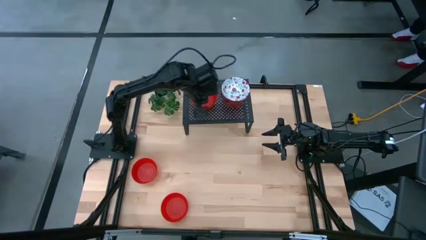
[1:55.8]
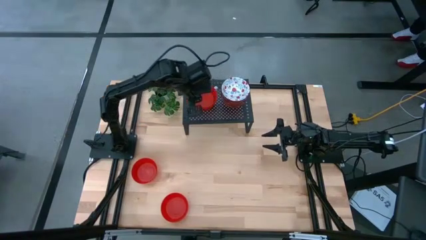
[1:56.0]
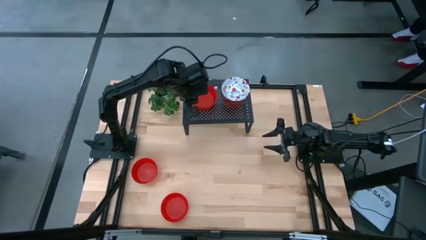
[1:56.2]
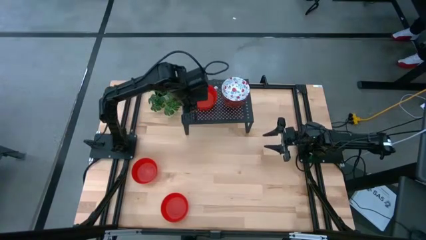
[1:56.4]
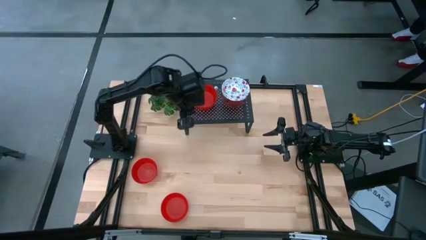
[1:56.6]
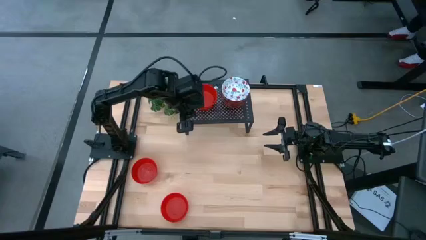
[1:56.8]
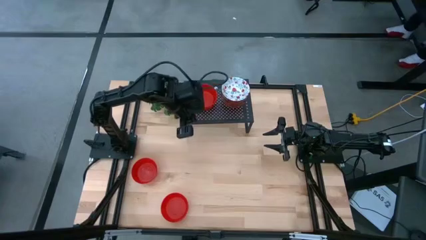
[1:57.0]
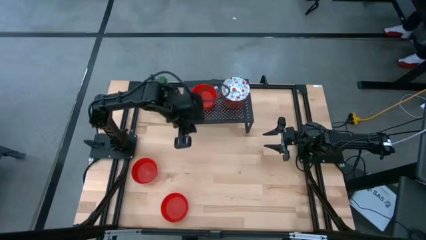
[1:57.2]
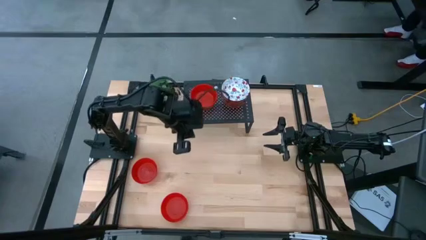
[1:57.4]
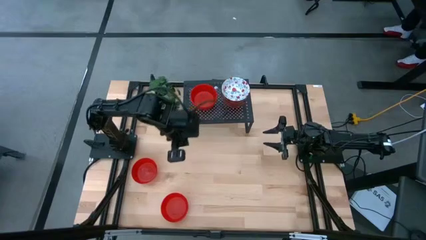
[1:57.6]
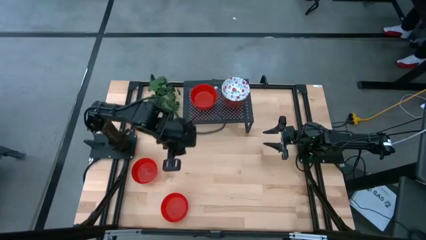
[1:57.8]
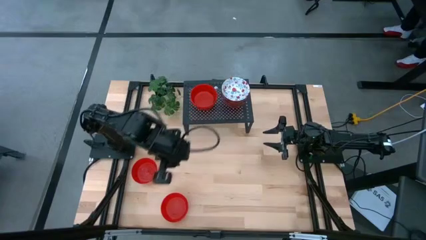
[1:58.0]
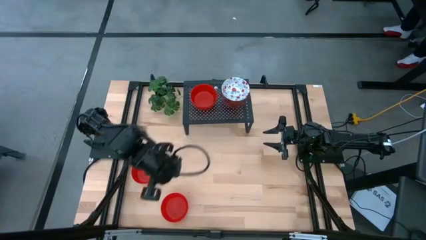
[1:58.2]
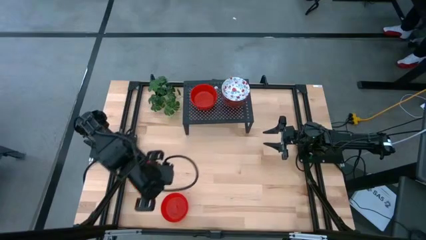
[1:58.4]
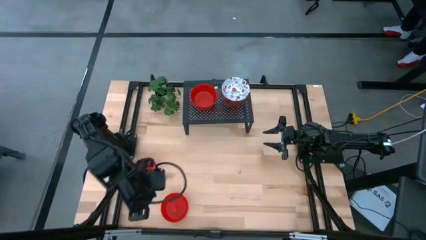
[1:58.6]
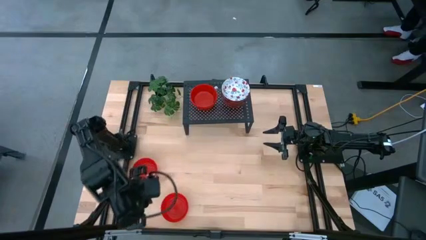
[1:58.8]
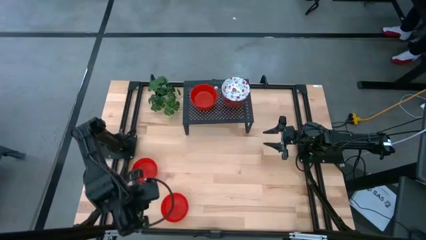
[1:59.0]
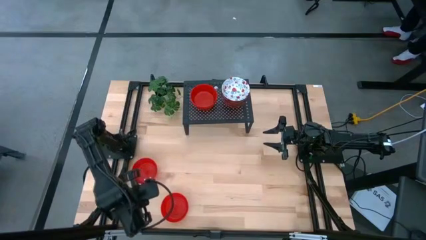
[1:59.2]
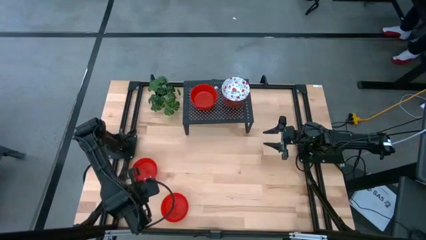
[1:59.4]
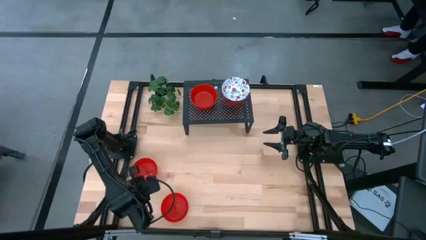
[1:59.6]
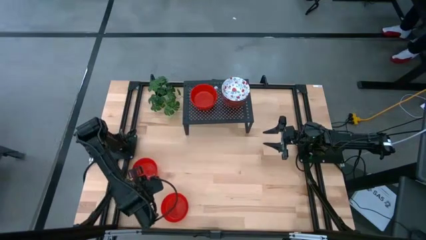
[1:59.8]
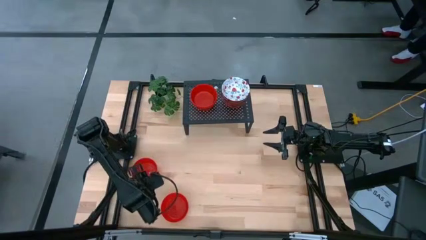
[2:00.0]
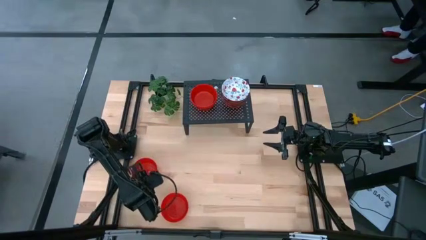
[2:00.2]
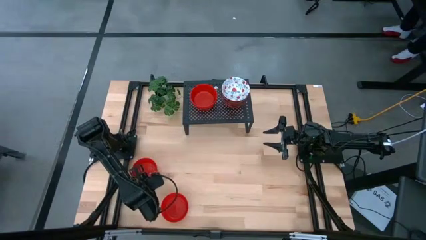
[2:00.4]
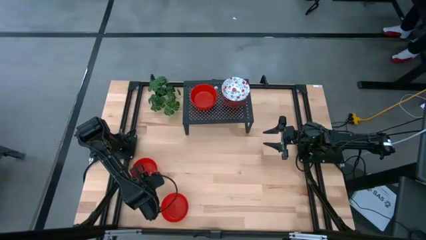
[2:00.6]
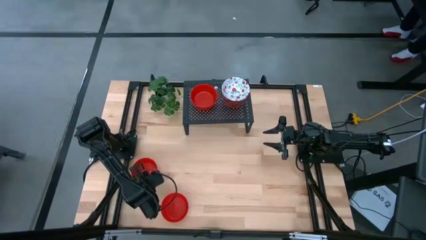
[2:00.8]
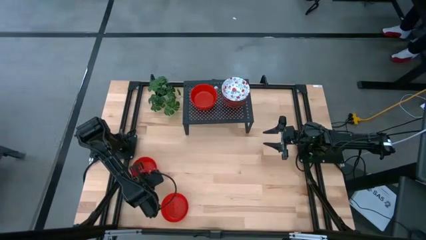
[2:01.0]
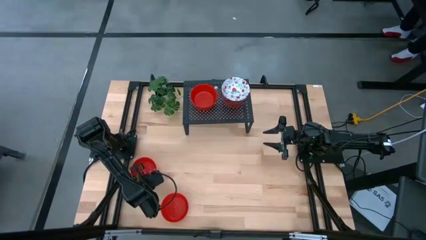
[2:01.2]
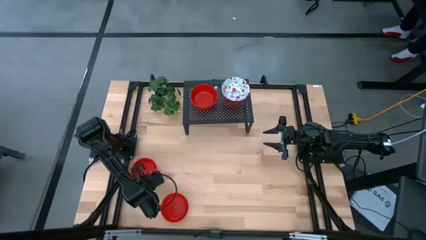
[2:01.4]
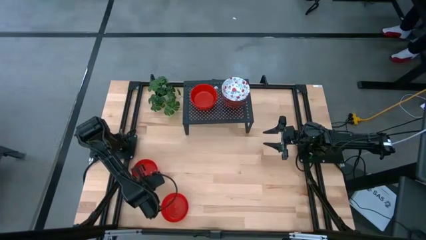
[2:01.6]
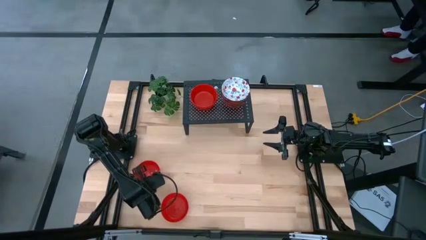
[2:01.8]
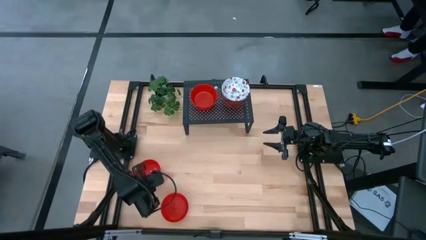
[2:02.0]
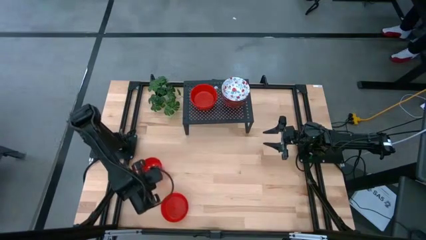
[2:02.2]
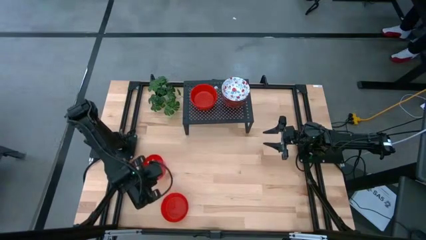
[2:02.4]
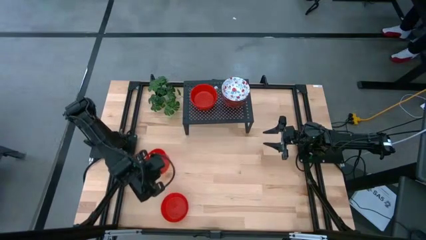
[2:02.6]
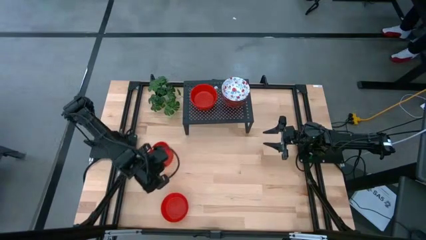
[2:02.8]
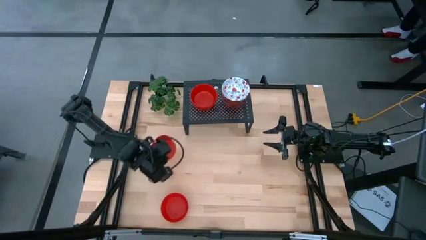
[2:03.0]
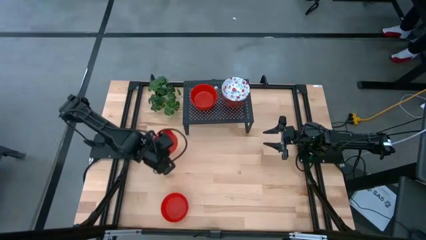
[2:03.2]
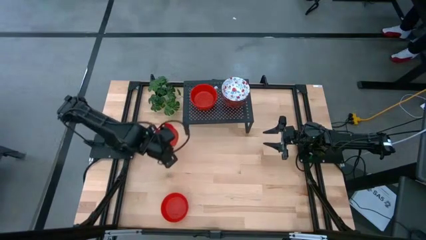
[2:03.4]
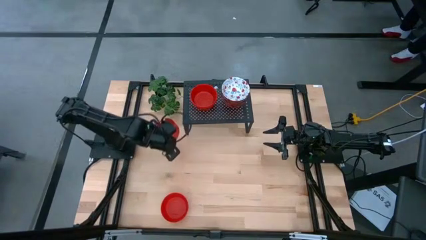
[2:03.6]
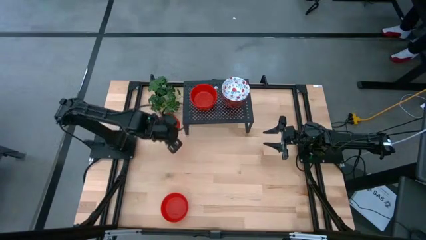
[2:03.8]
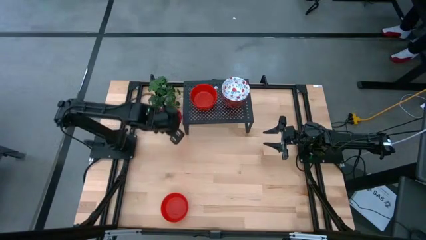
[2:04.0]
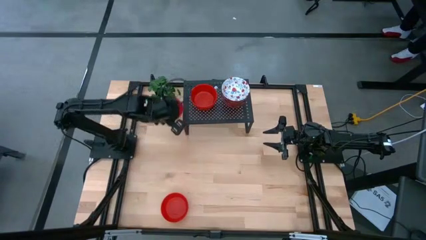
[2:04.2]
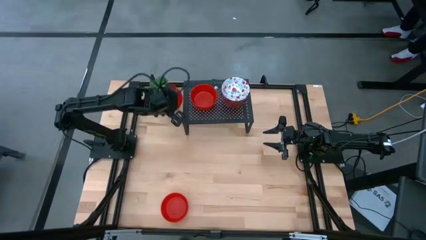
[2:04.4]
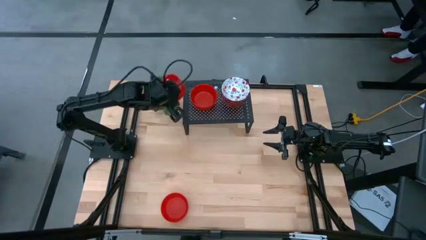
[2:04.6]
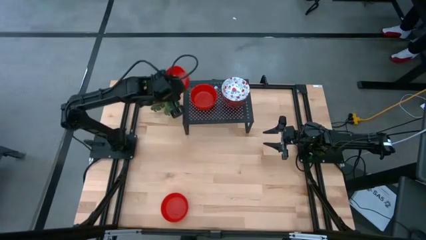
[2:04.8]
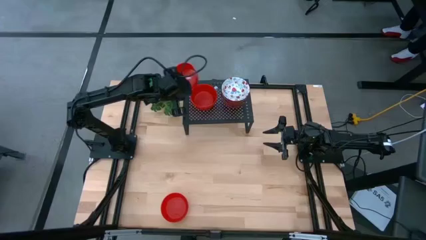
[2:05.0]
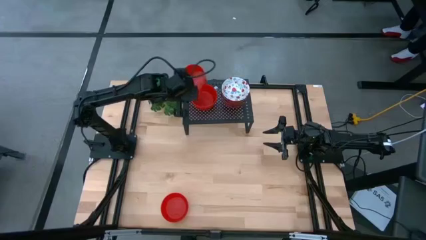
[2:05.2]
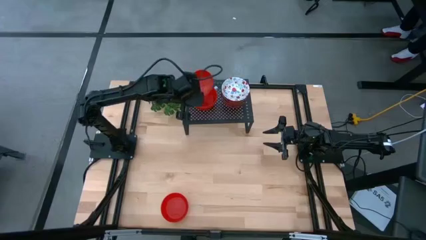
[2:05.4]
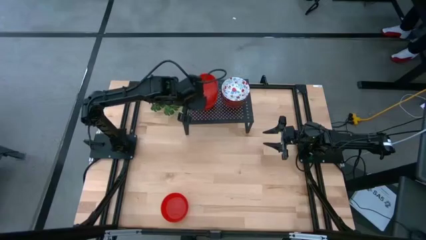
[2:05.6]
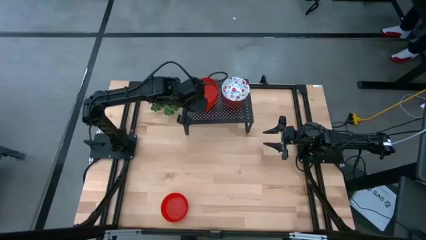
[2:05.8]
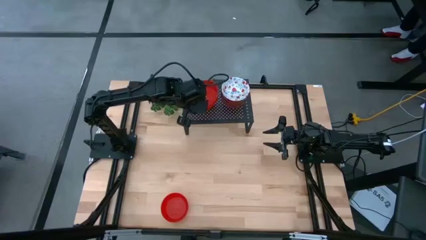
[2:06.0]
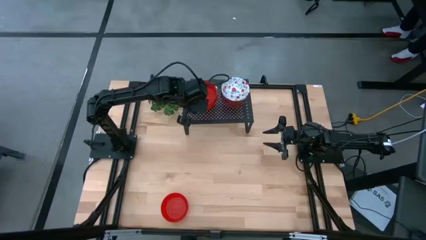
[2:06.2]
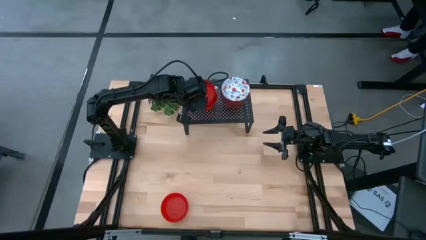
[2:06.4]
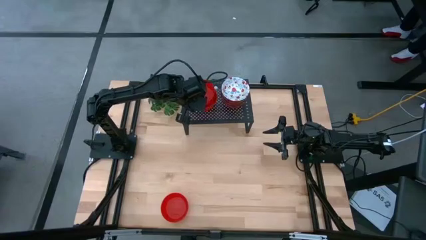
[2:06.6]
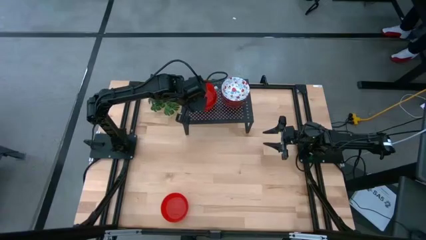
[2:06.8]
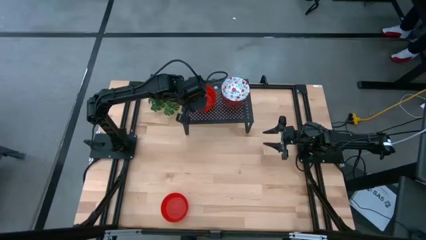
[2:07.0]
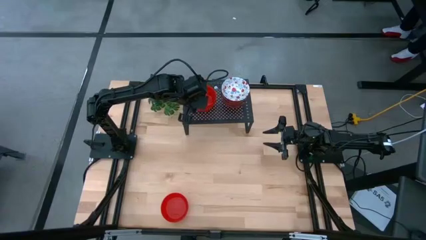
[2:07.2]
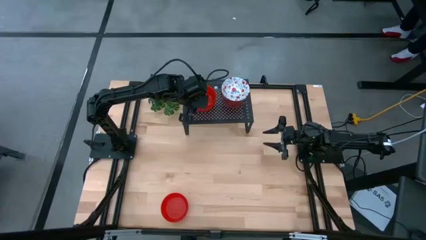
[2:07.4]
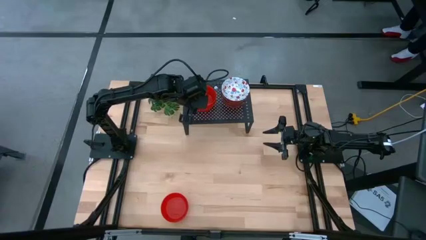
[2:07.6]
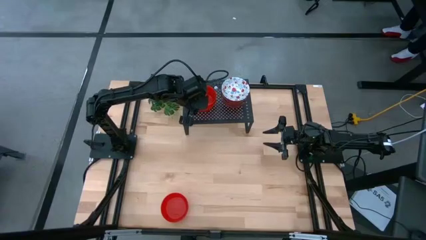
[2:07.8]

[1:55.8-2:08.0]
Task: Pick & Place Mini bowls
Stack the top red bowl on the top of the red bowl on the shelf
